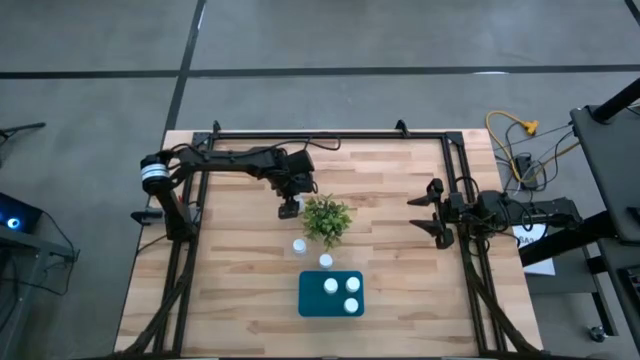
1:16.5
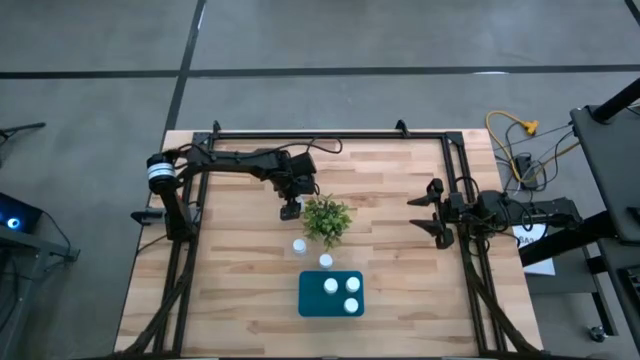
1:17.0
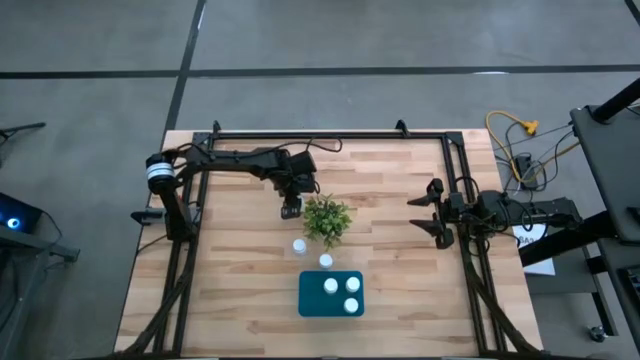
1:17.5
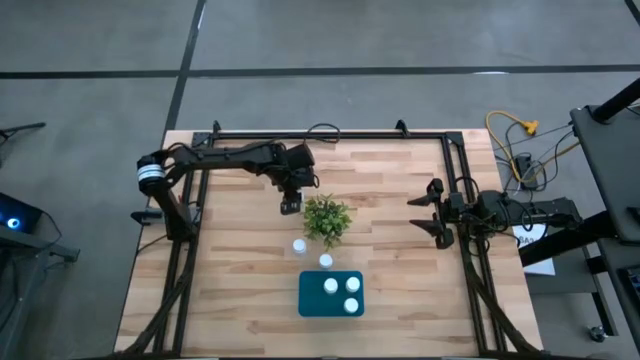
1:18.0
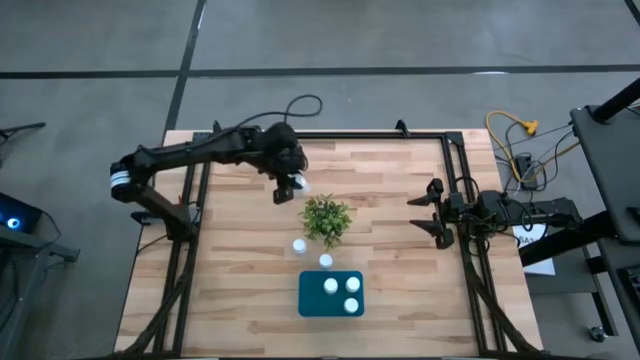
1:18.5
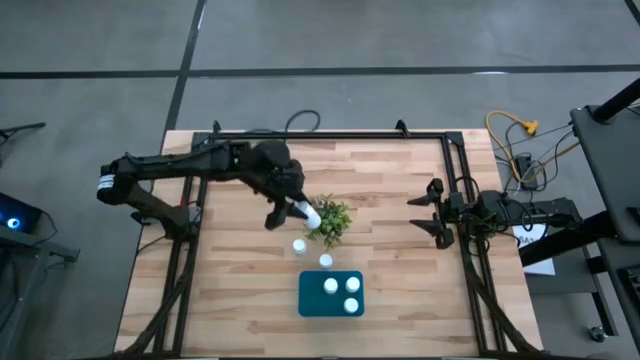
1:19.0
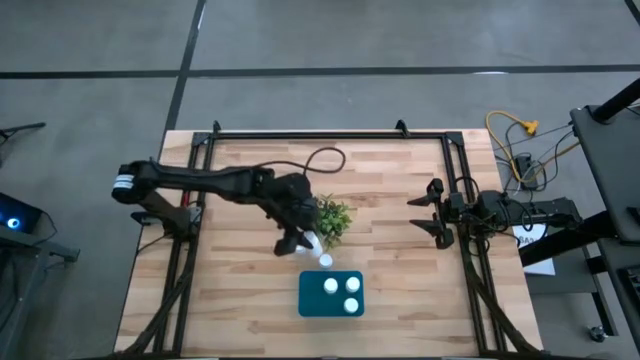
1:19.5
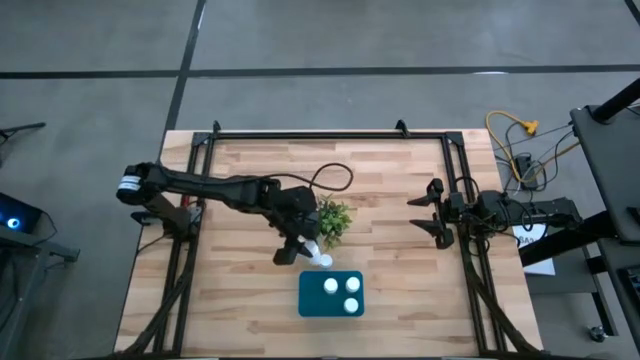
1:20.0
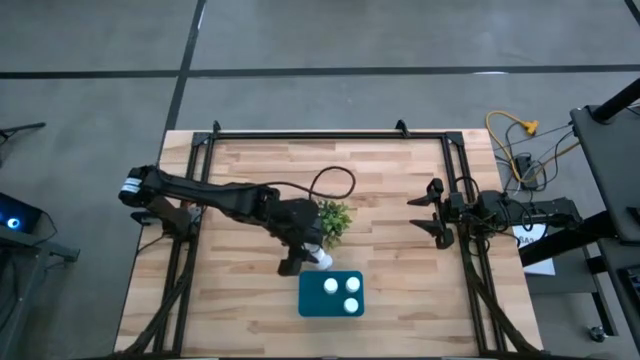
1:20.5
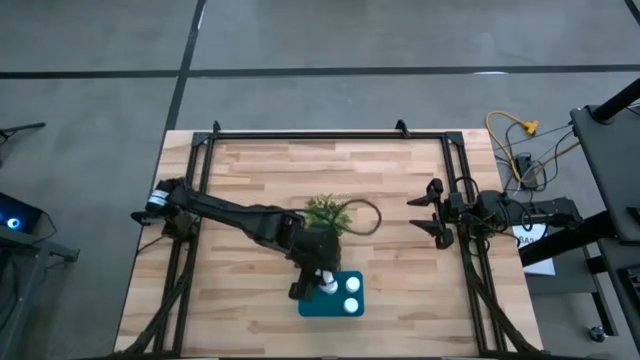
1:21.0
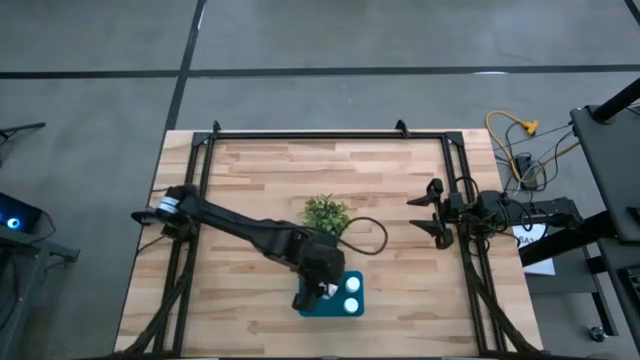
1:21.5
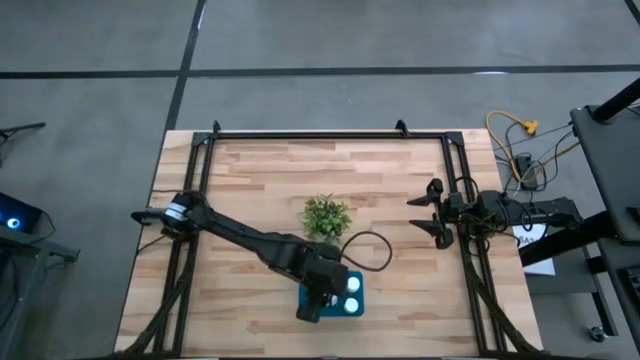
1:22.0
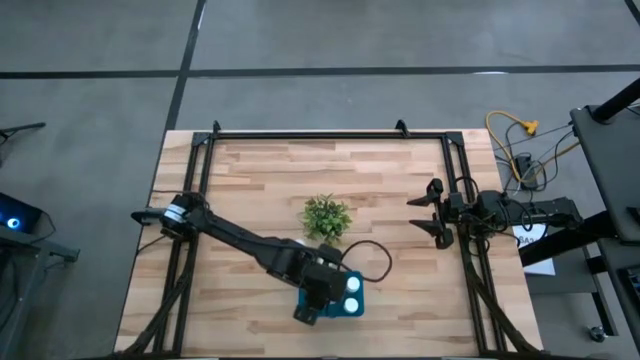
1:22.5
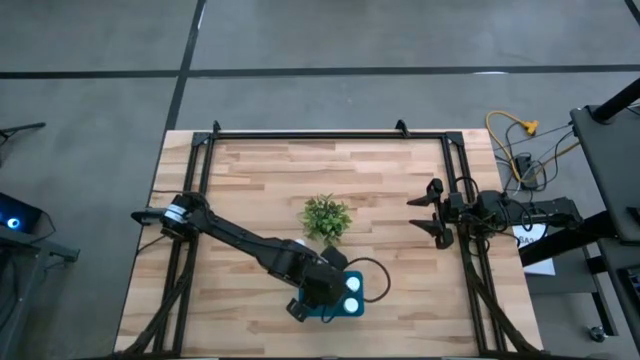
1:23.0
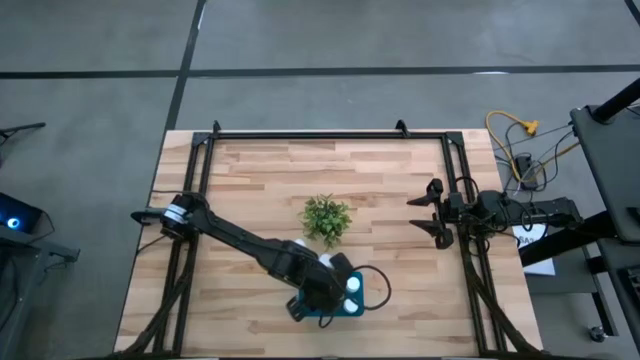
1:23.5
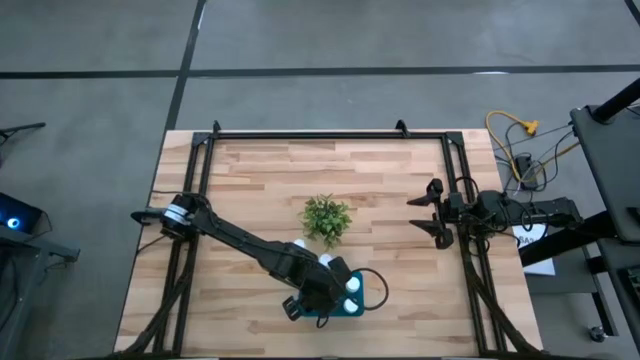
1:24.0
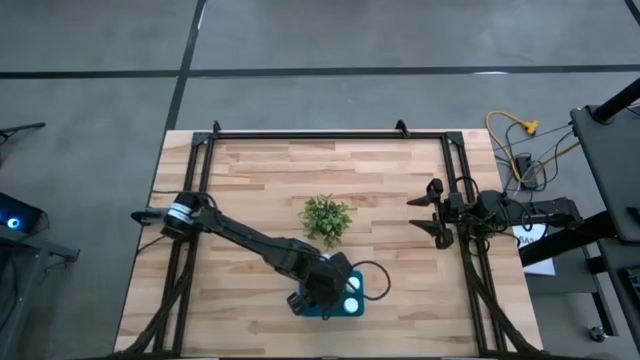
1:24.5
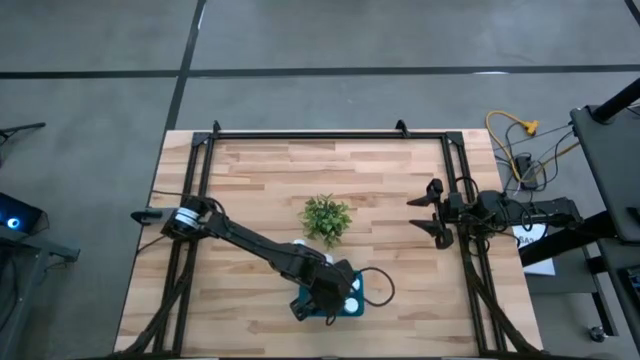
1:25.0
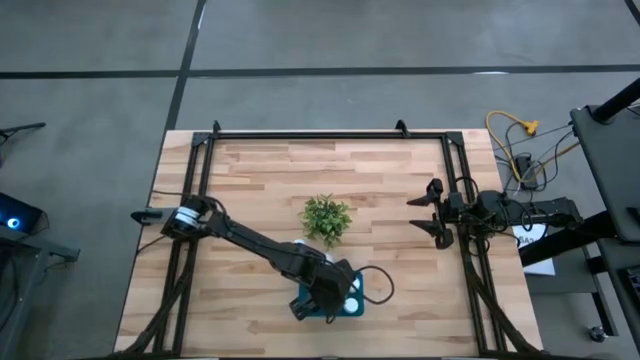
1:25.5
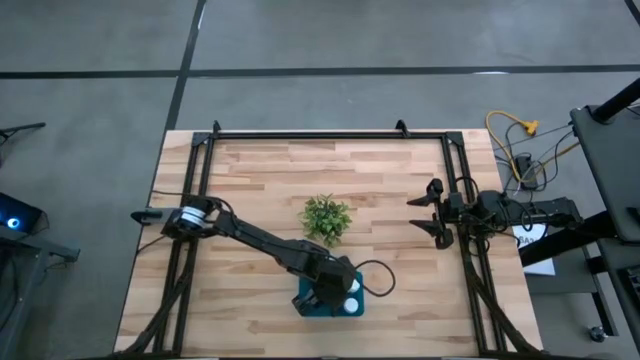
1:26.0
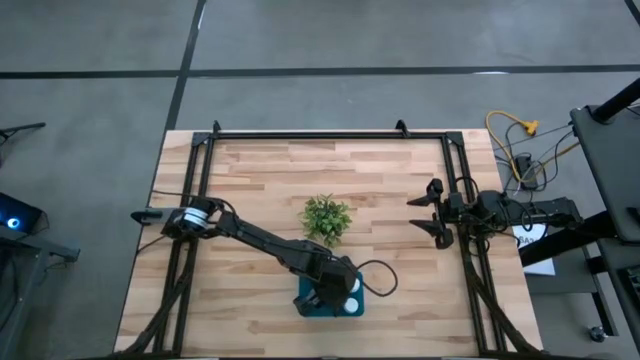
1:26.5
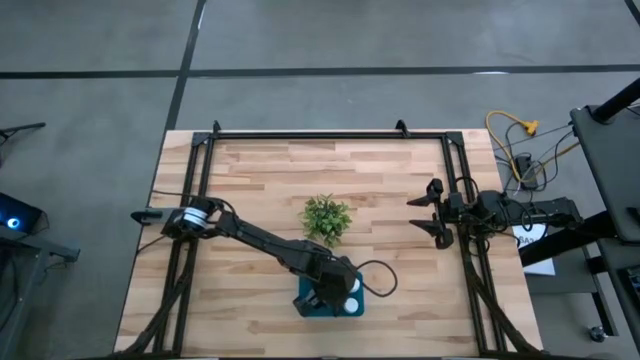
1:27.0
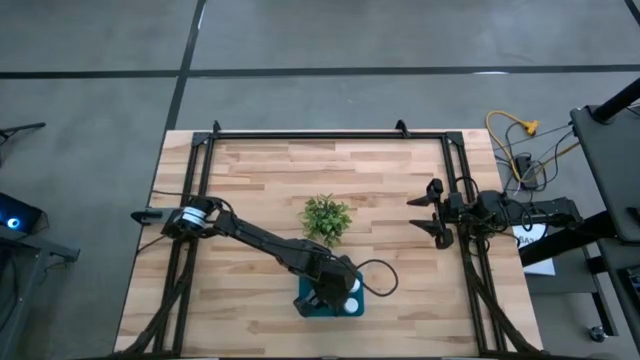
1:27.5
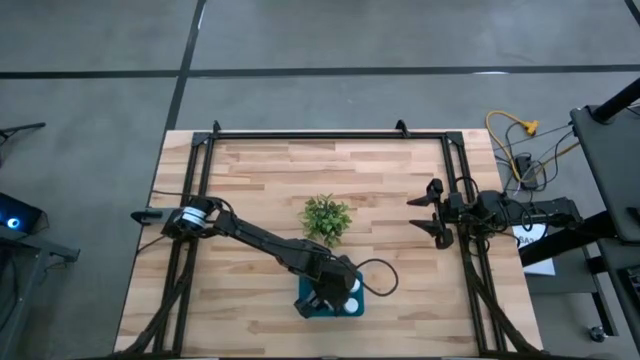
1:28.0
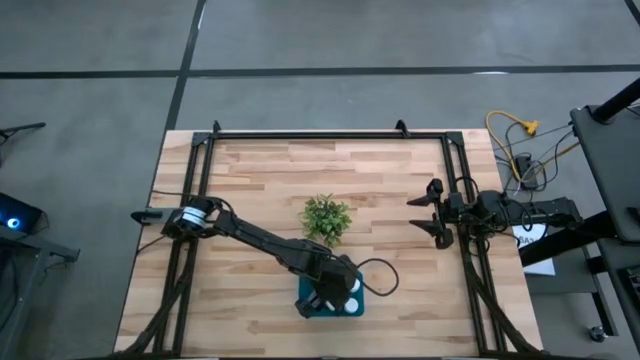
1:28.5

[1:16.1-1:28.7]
Task: Pick and place pill bottles into a basket
Put the white medicine bottle into the blue bin

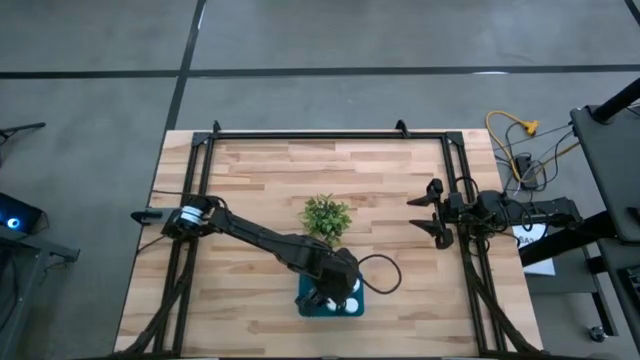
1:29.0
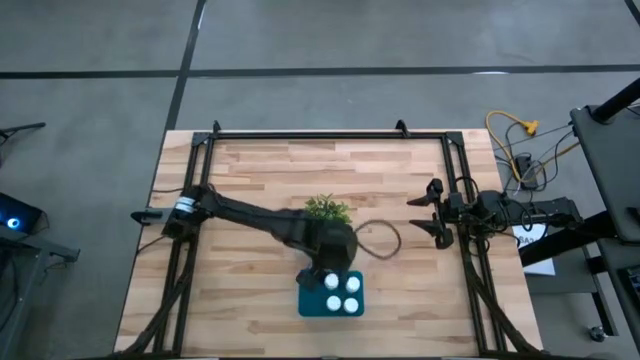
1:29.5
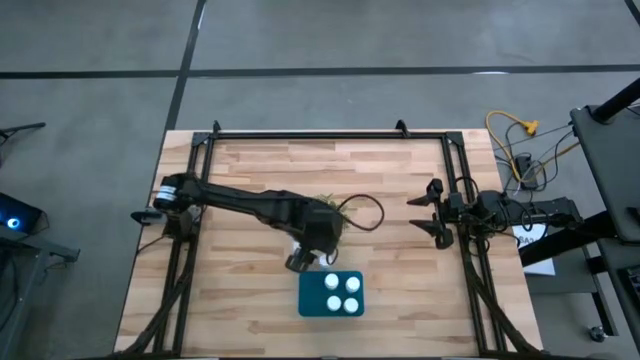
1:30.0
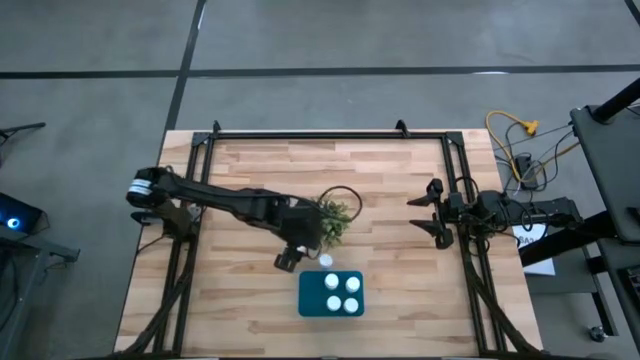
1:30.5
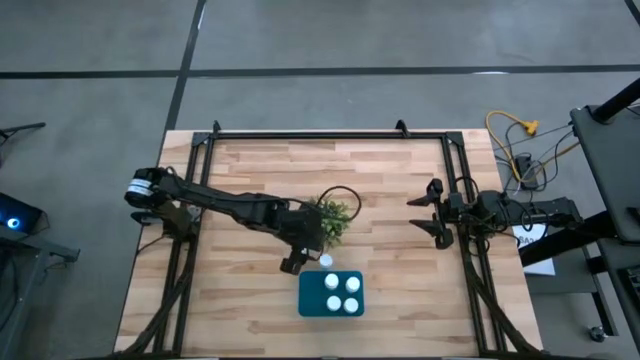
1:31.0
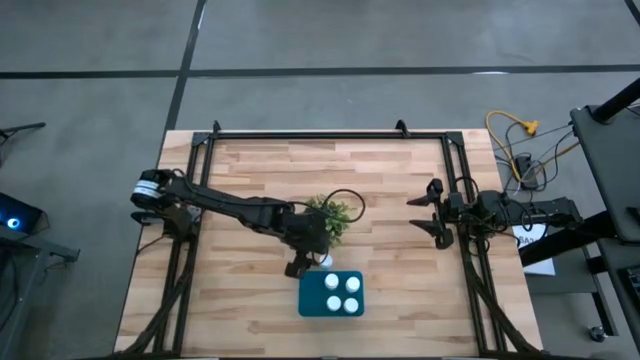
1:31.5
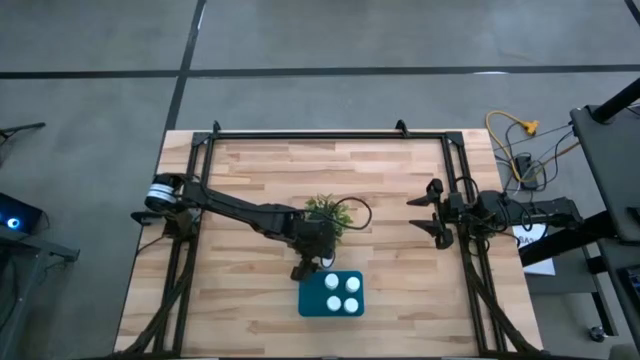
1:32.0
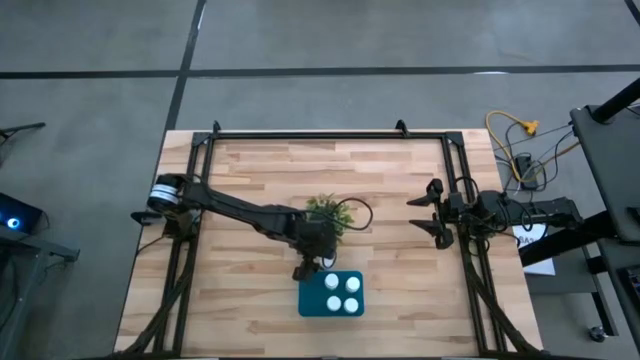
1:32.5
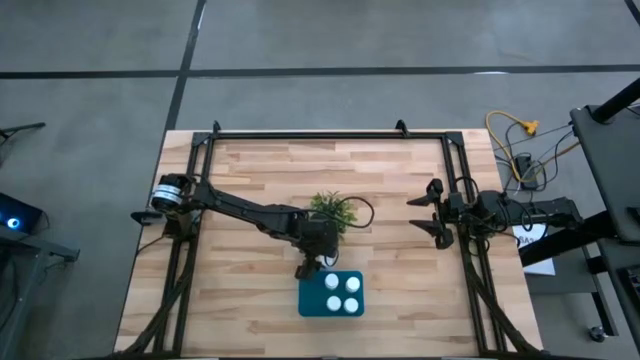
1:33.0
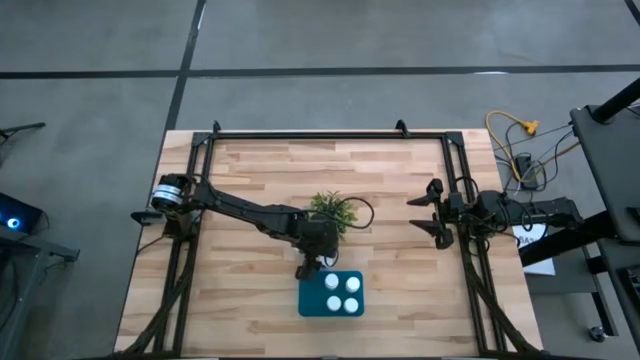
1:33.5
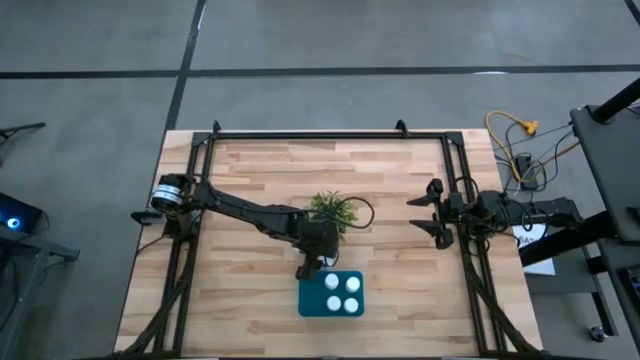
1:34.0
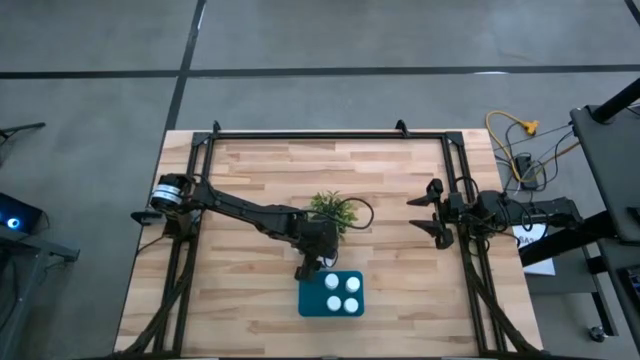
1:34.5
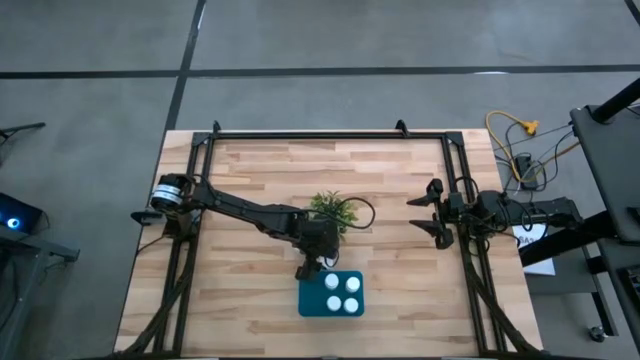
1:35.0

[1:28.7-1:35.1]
Put the white medicine bottle into the blue bin

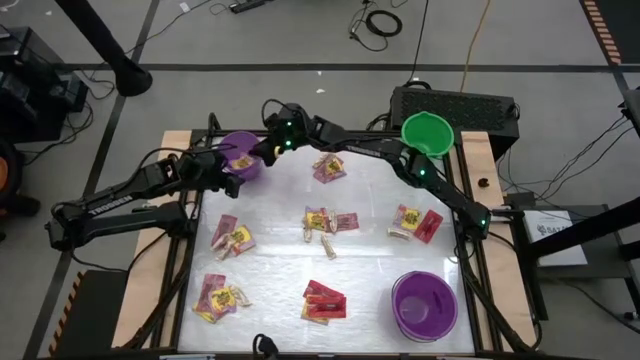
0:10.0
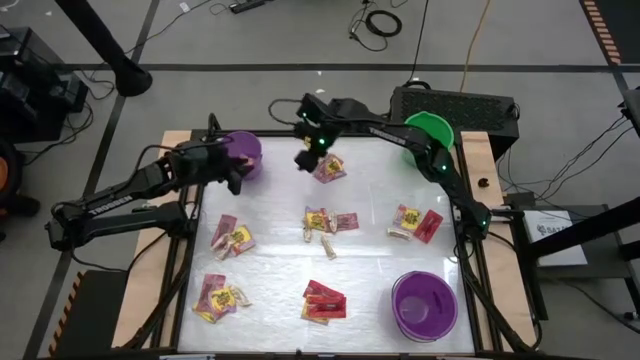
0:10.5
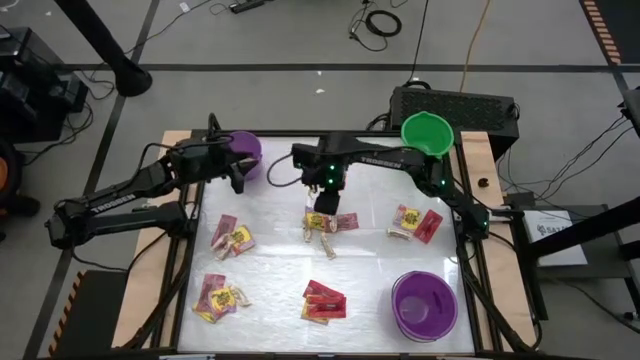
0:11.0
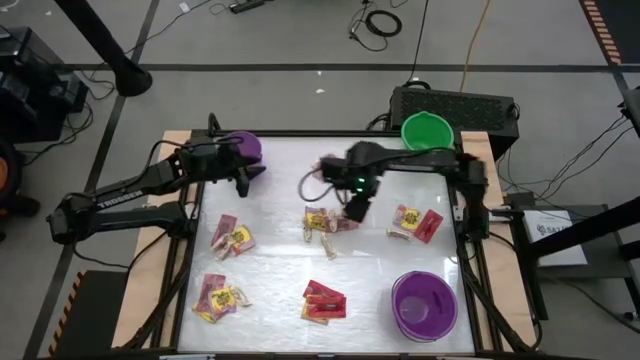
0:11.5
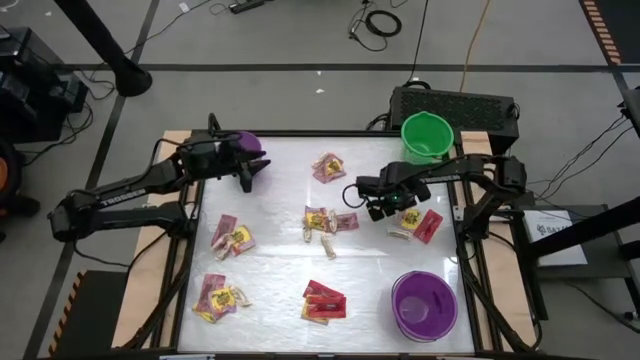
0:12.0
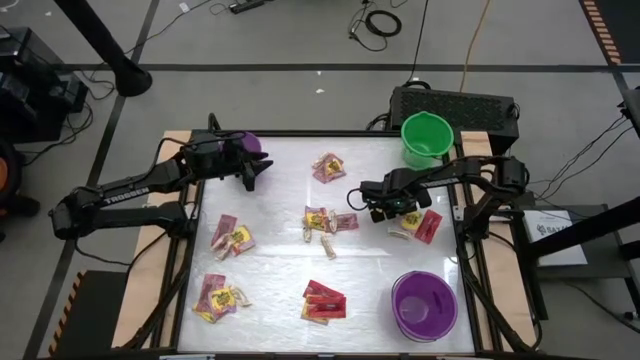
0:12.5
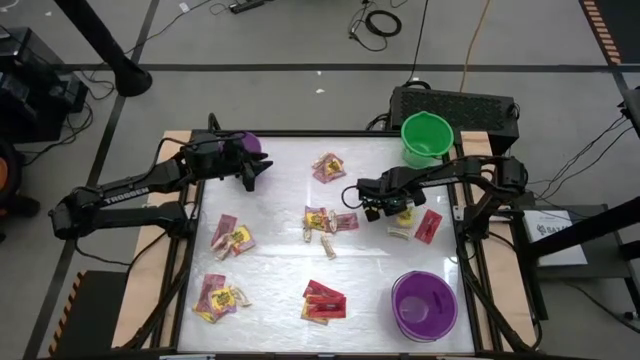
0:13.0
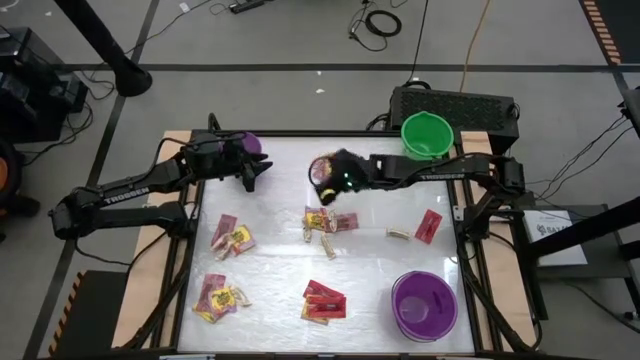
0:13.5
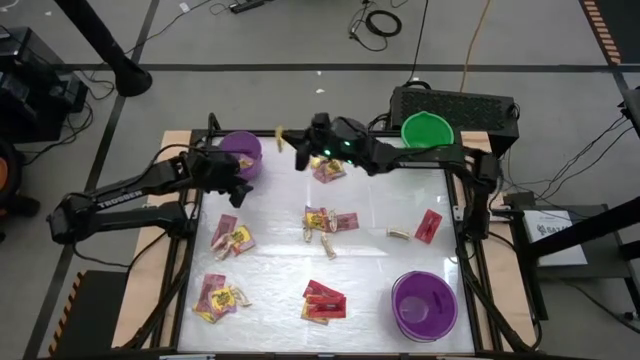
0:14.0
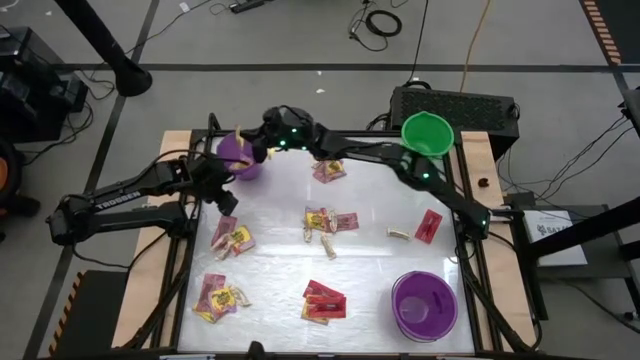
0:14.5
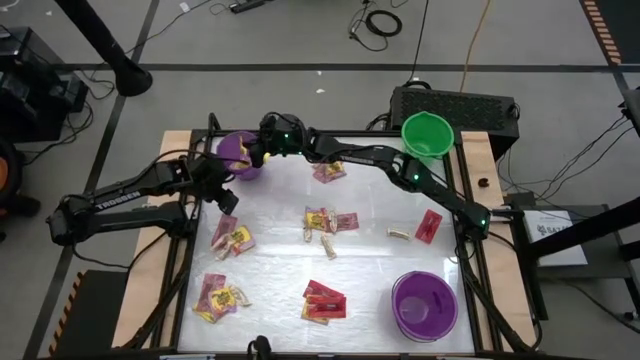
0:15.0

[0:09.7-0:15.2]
Task: Sort candy by brand, put in halloween buckets
Put the yellow candy into the top violet bucket
